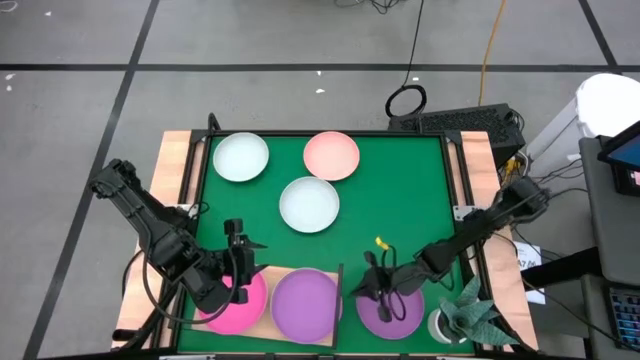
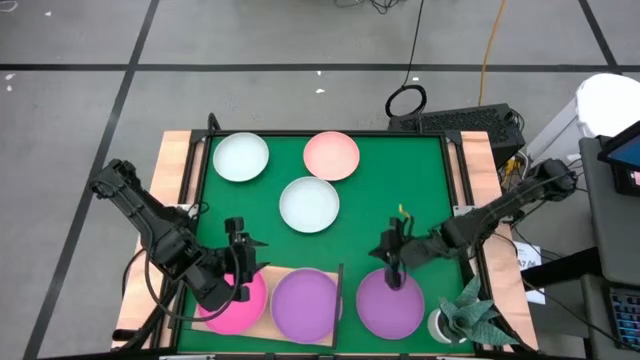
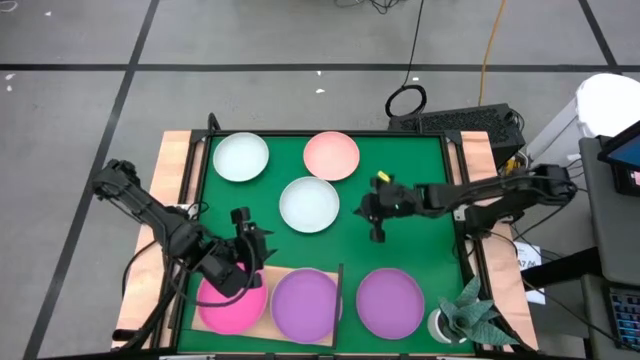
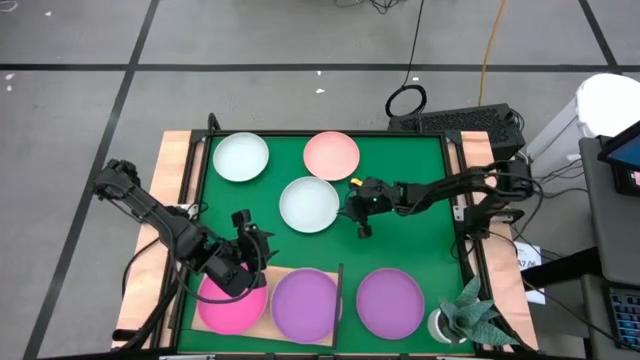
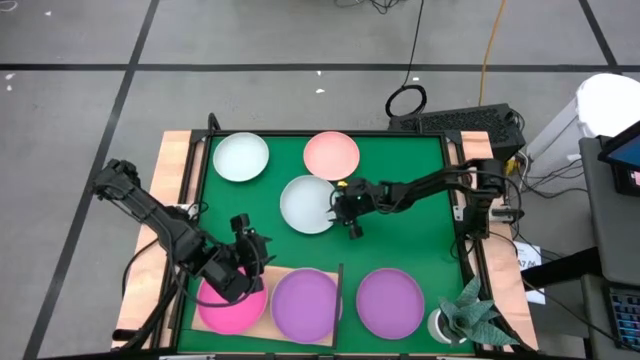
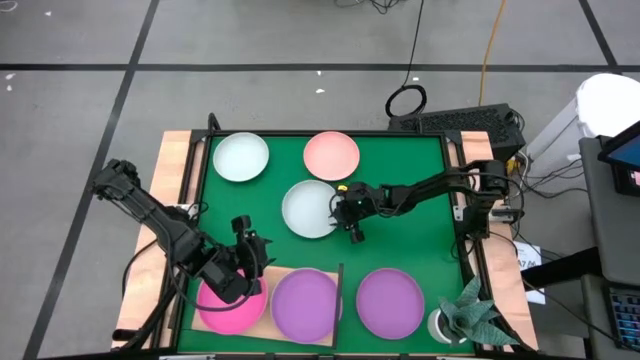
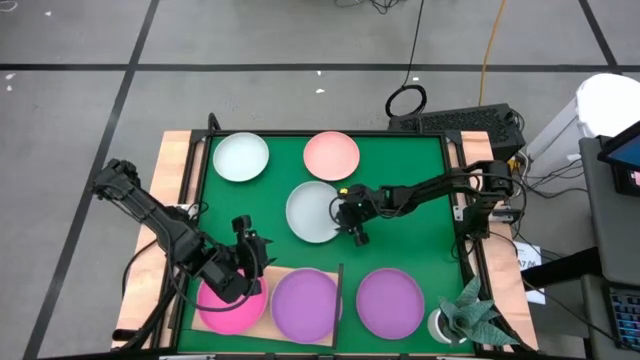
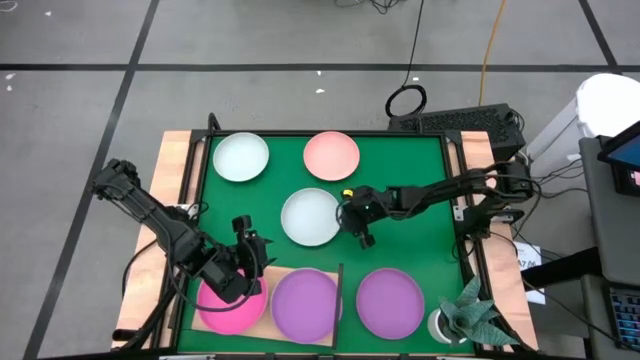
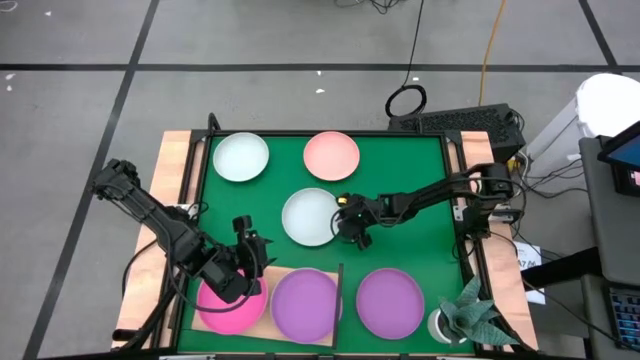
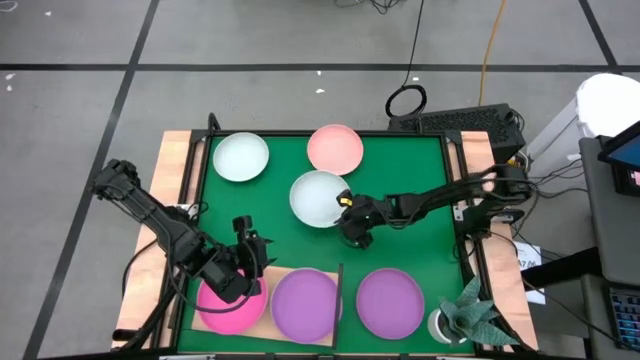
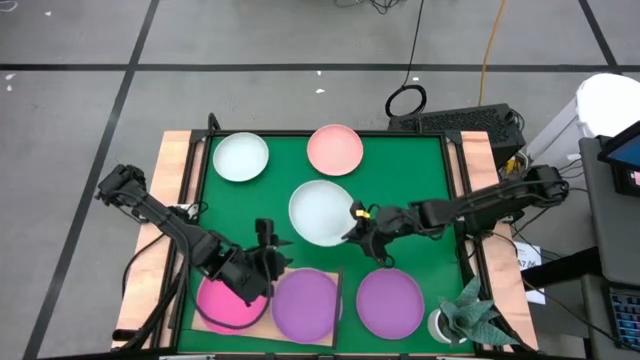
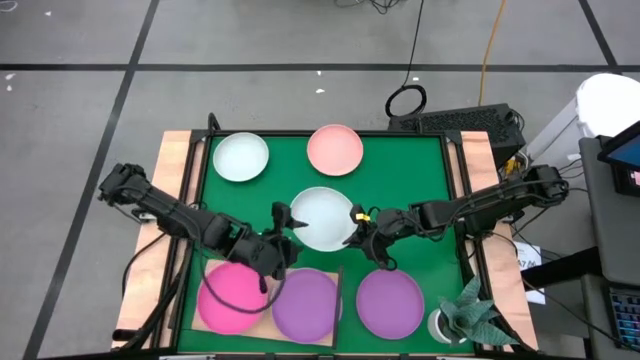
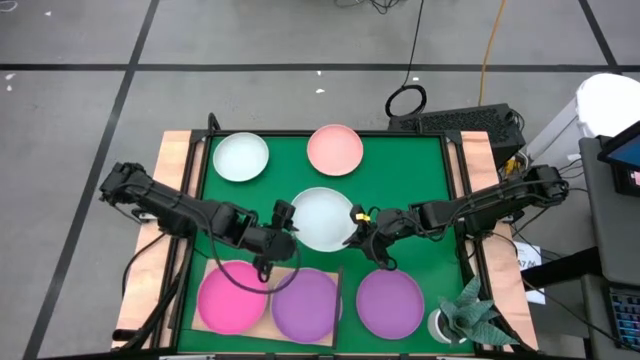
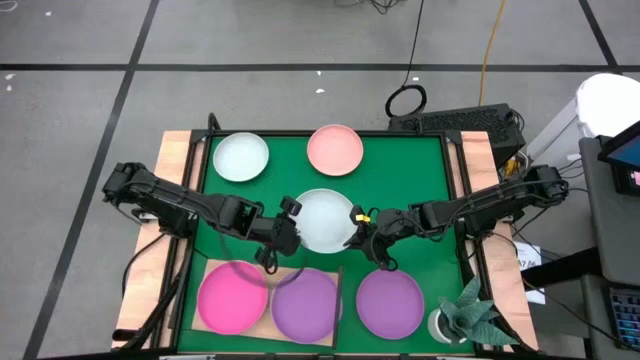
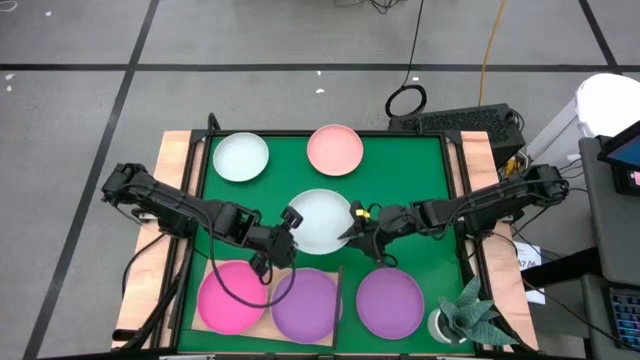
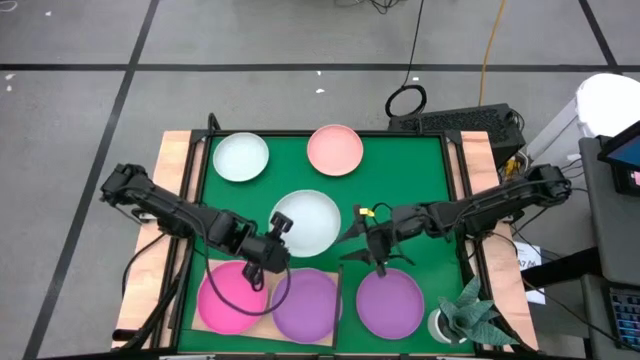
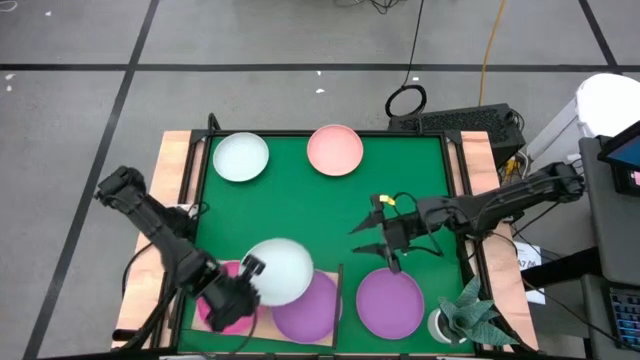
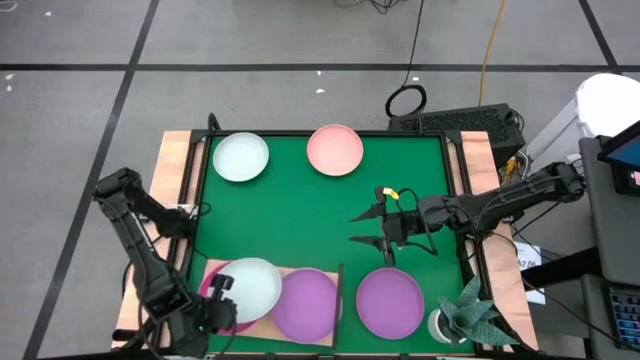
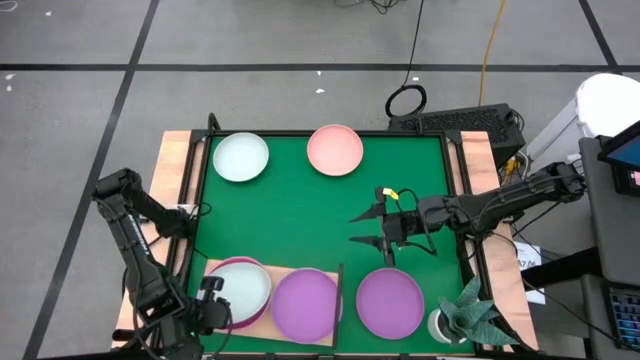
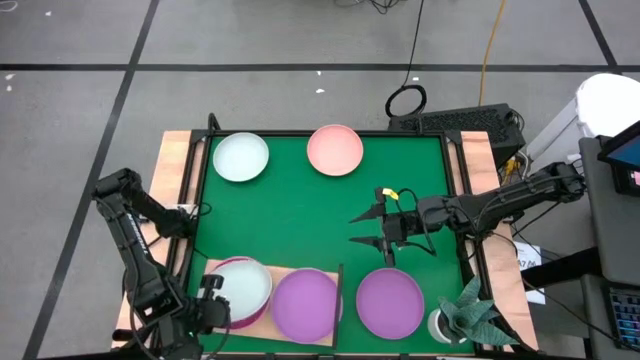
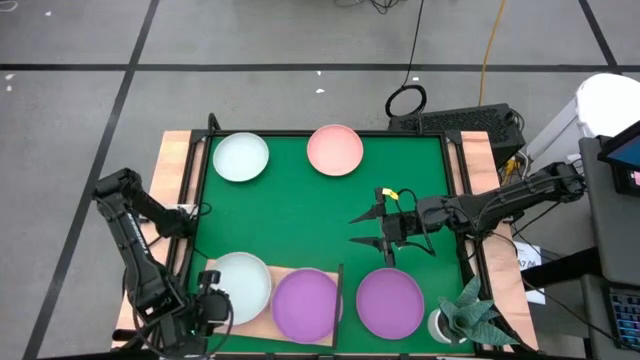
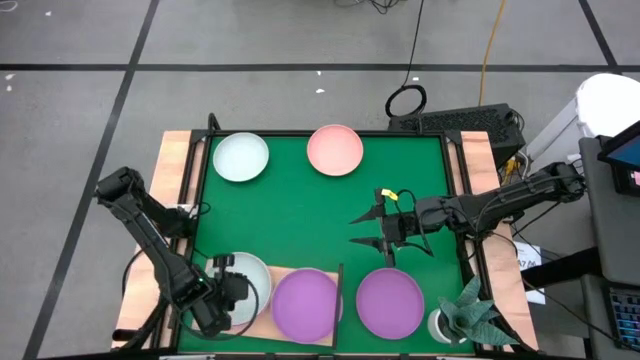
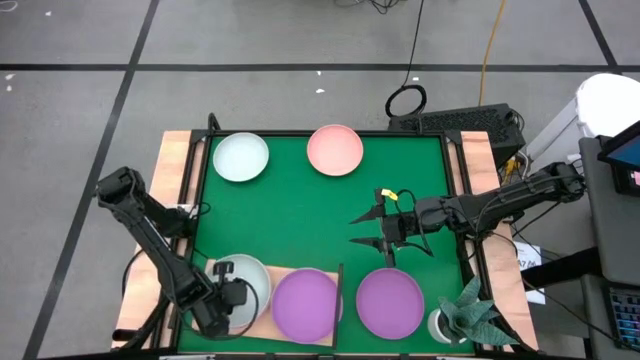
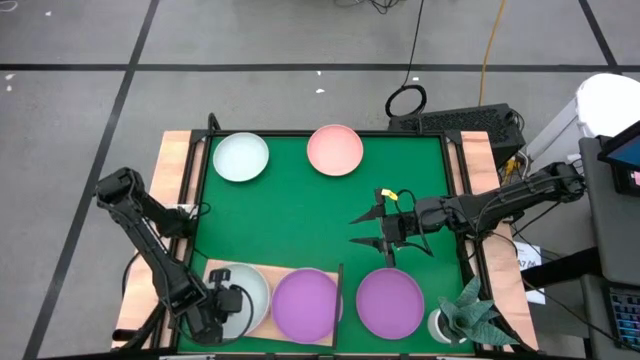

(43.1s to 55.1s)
Task: Place and stack plates onto a shelf
Stack the bottom white plate on top of the pink plate on the shelf

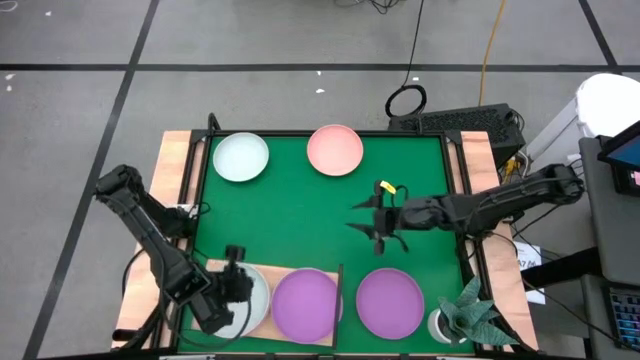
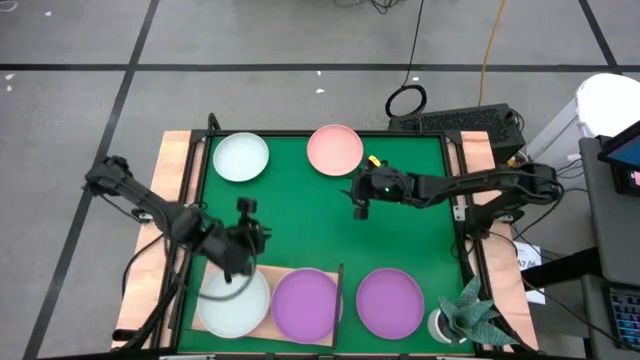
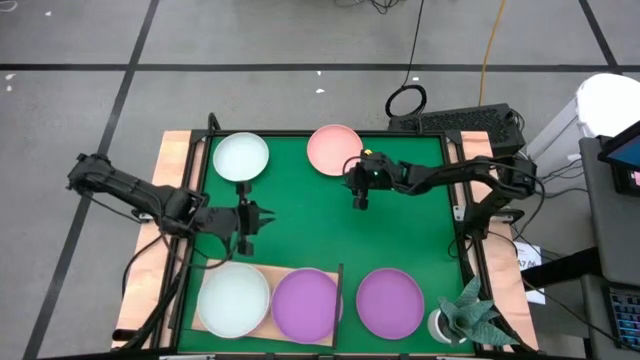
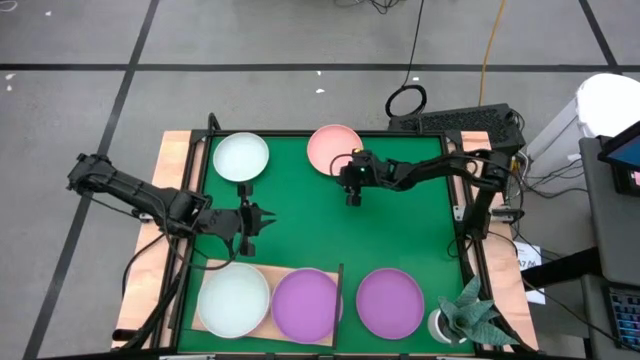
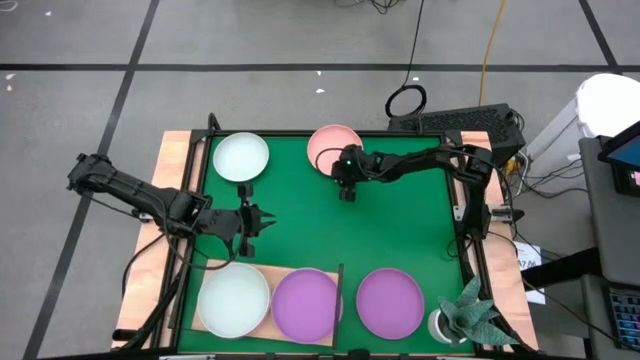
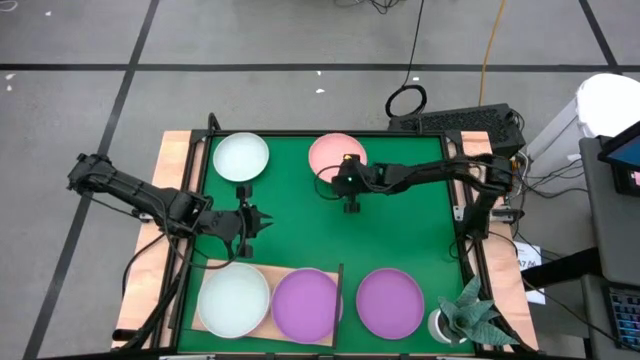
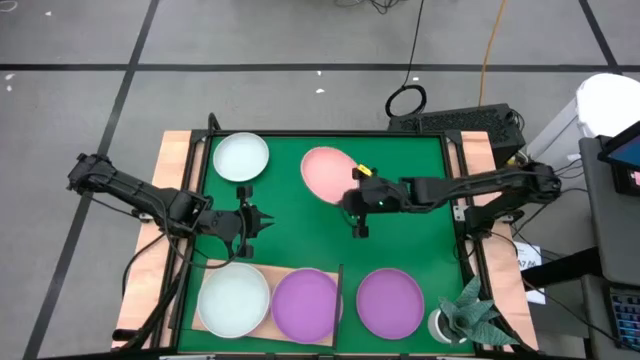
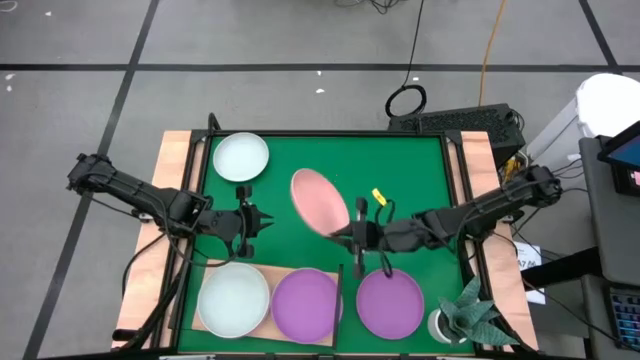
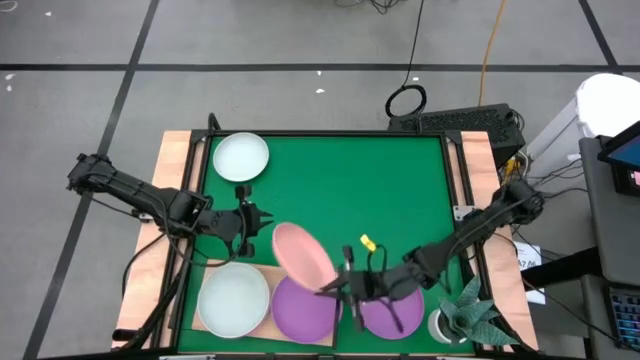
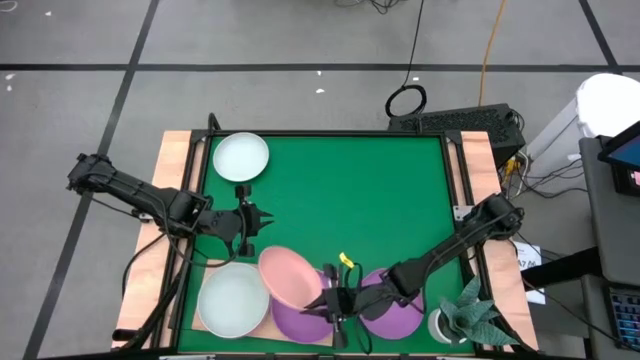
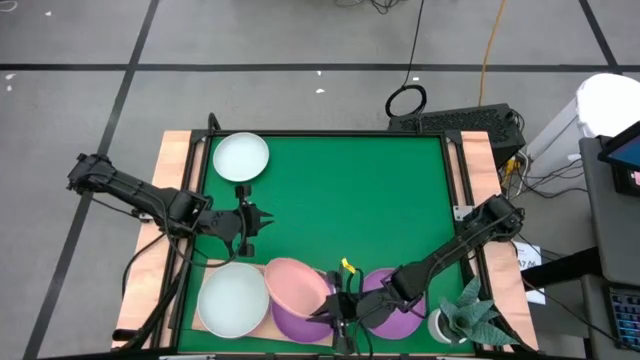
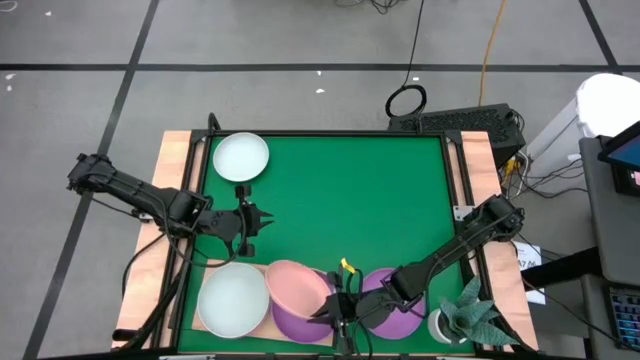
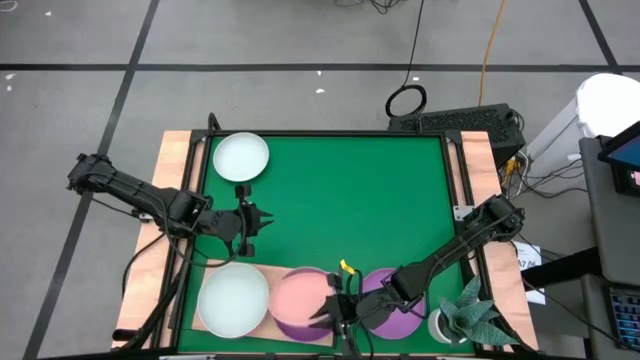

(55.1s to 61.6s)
Stack the orange plate on top of the purple plate on the shelf

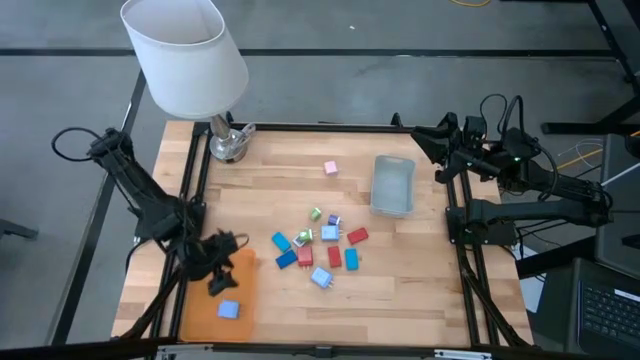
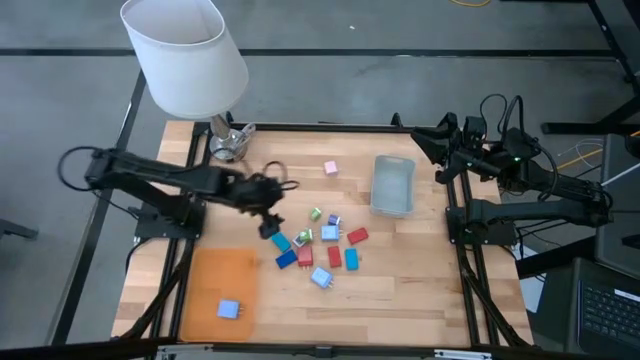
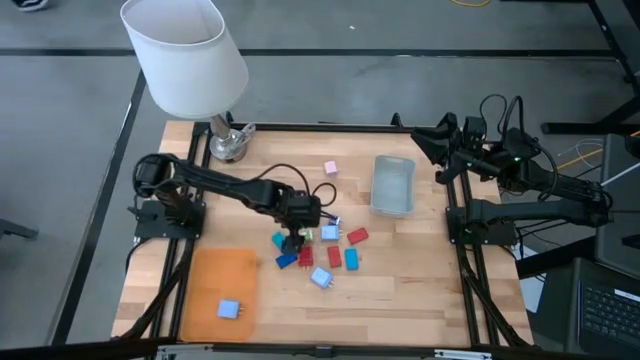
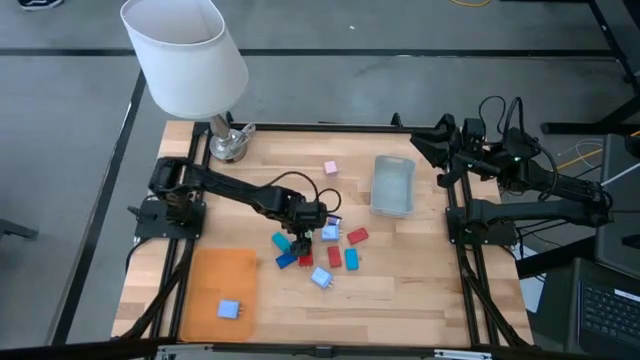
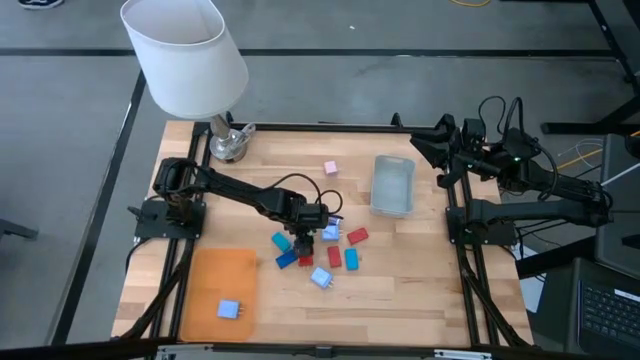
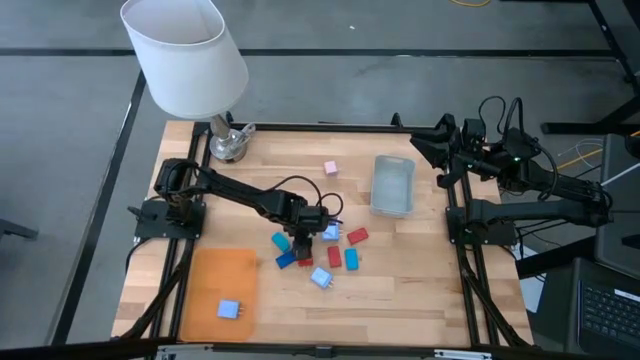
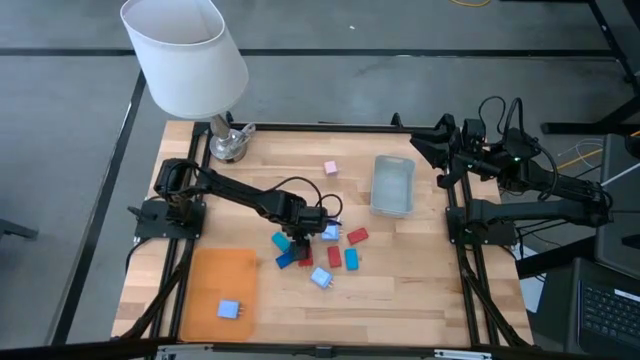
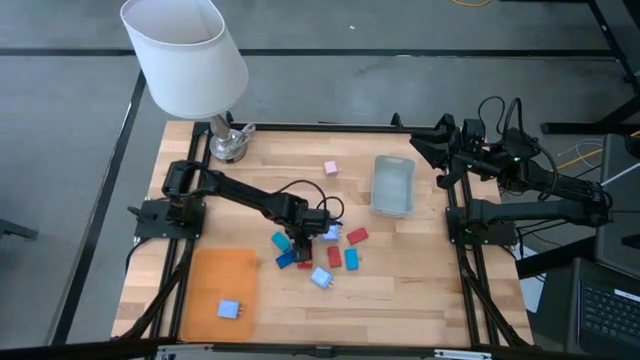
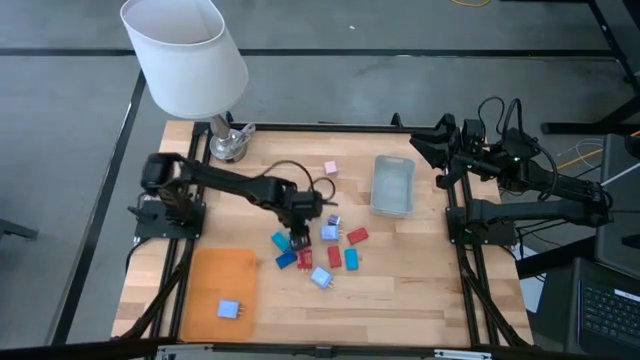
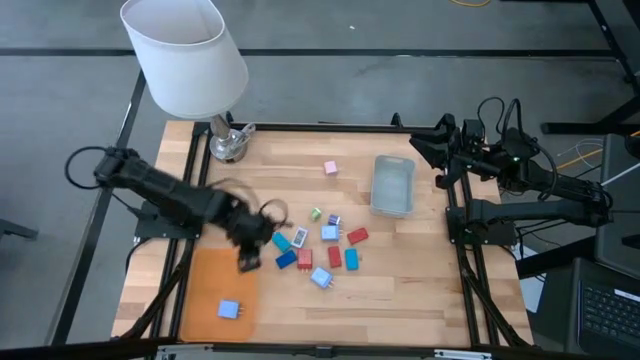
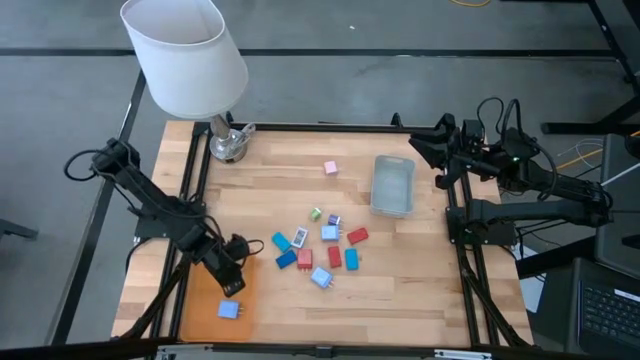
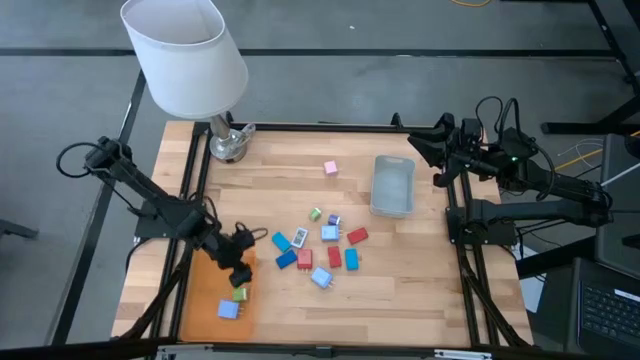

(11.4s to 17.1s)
Task: Pick & Place Office items
Put the bottom green charger adapter into the orange bin
